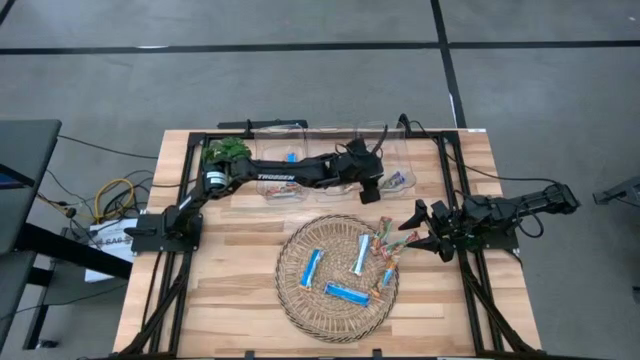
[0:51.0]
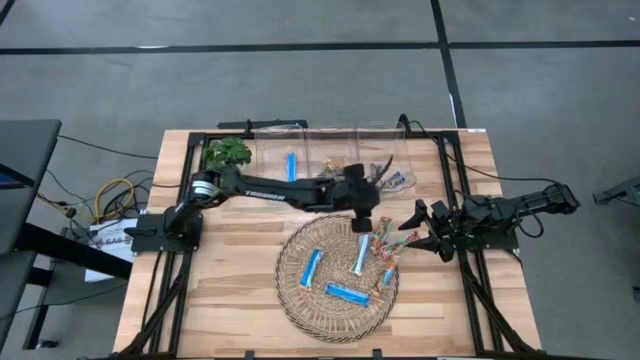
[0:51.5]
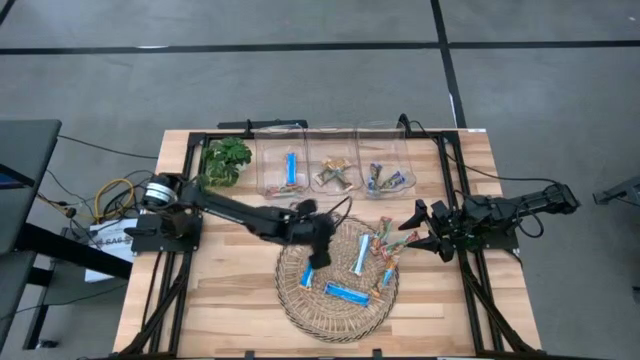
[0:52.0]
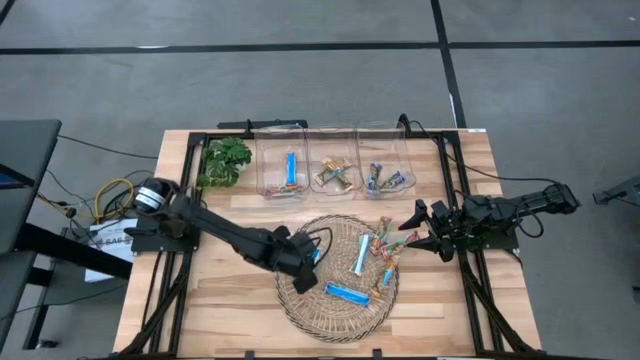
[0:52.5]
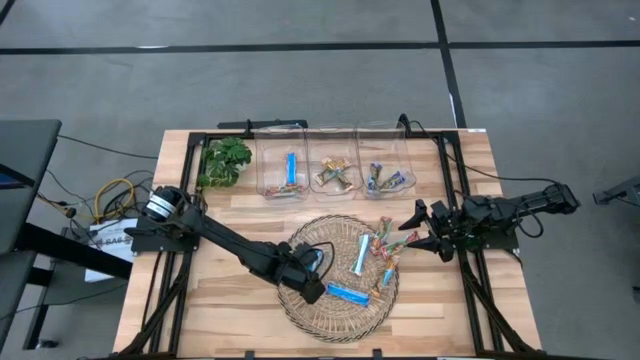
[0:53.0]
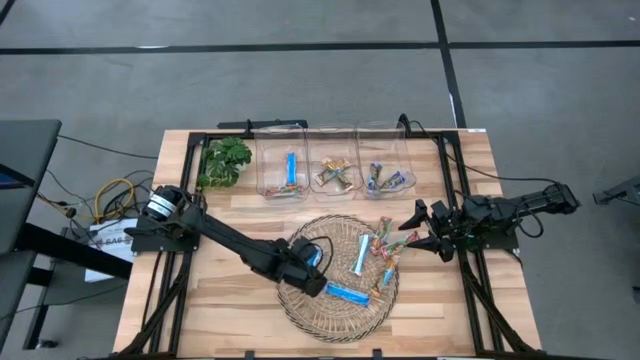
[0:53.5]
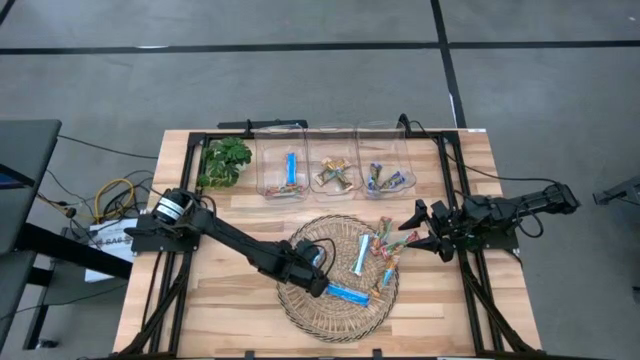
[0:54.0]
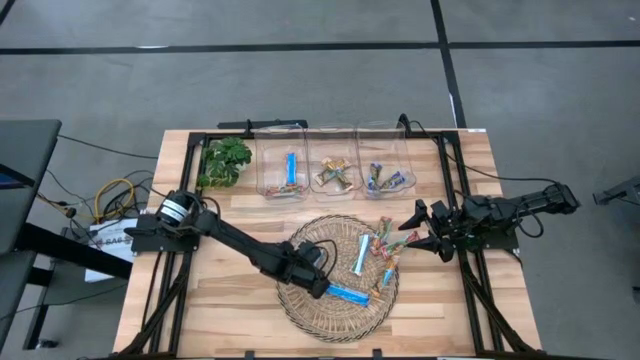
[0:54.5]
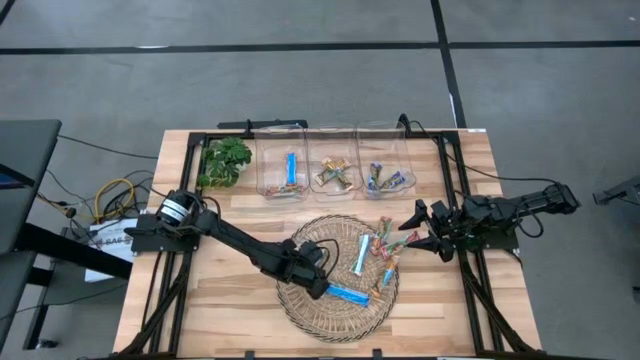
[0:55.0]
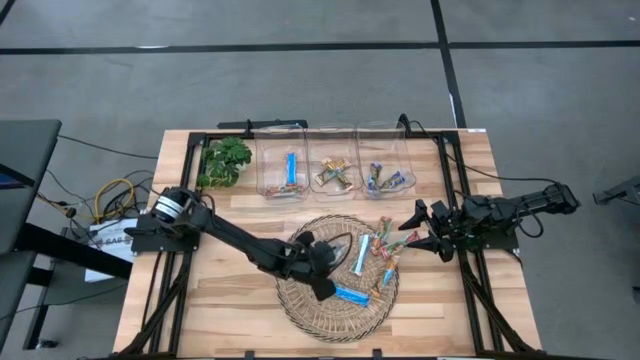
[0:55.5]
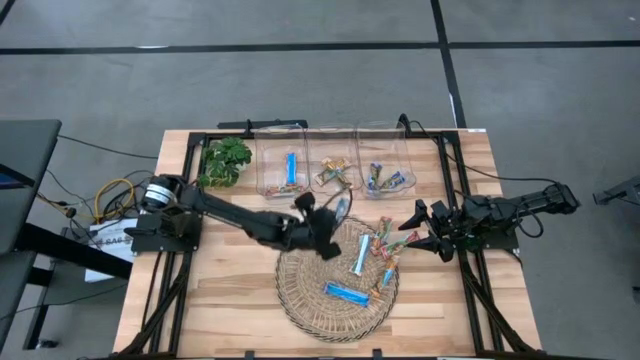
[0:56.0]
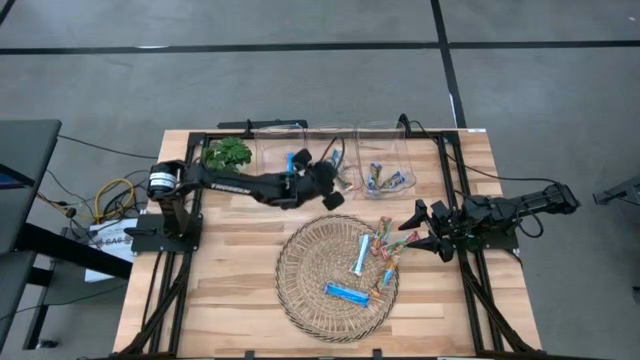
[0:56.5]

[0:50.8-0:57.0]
Task: Pick and place Granola Bars by type
Put the yellow granola bar into the middle transparent bin

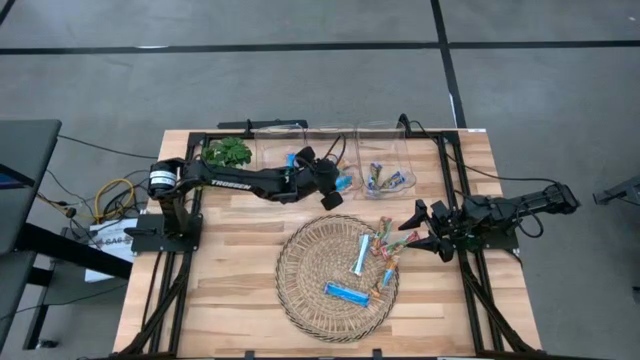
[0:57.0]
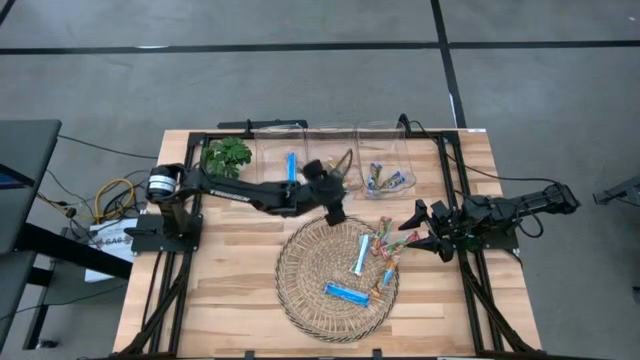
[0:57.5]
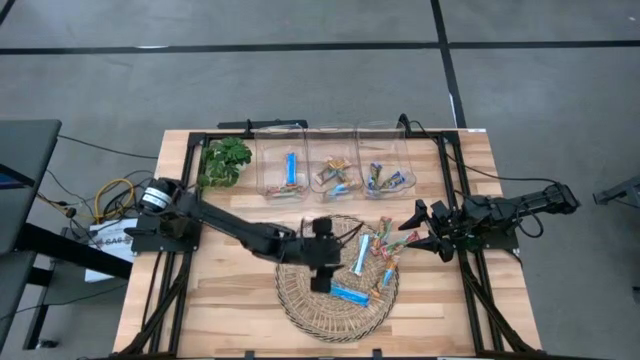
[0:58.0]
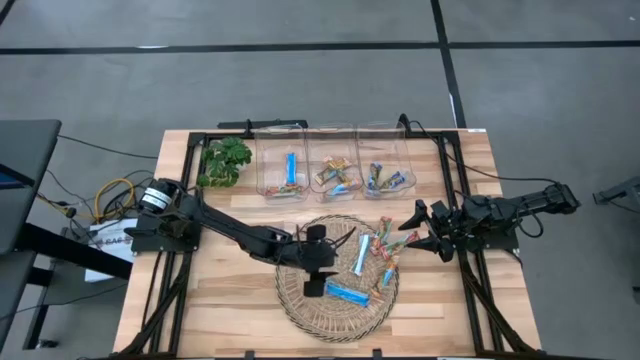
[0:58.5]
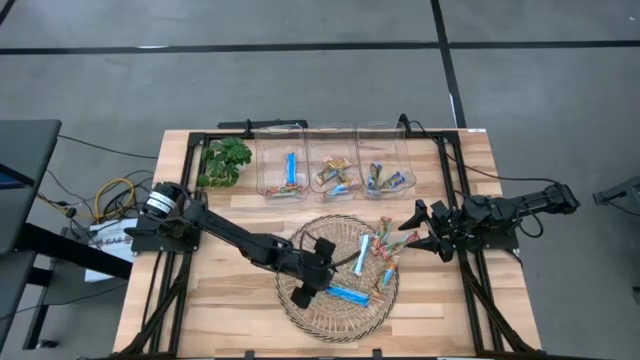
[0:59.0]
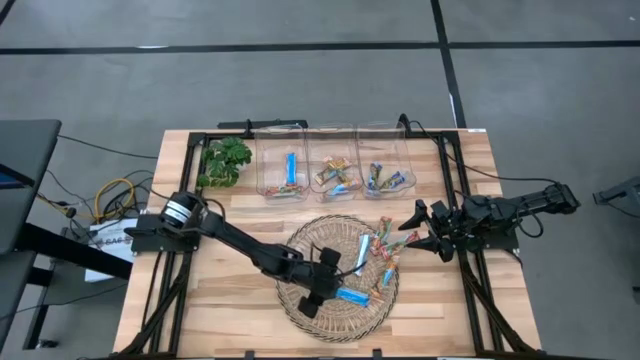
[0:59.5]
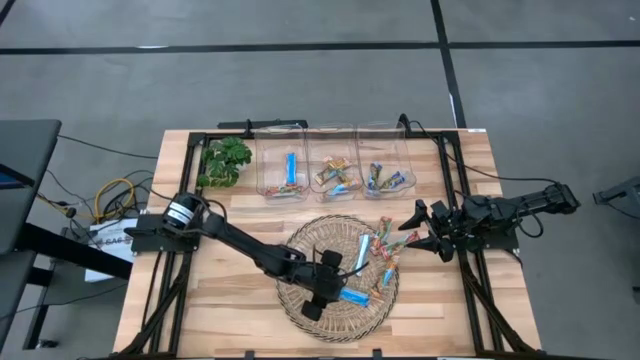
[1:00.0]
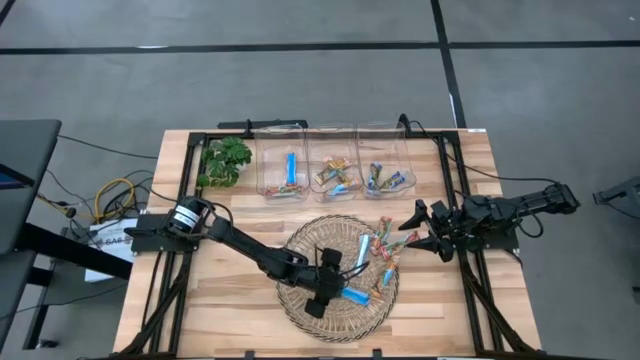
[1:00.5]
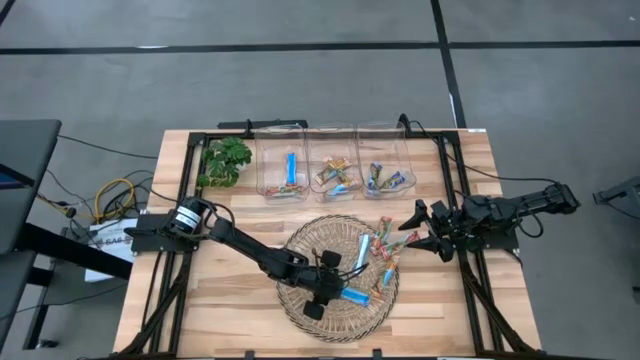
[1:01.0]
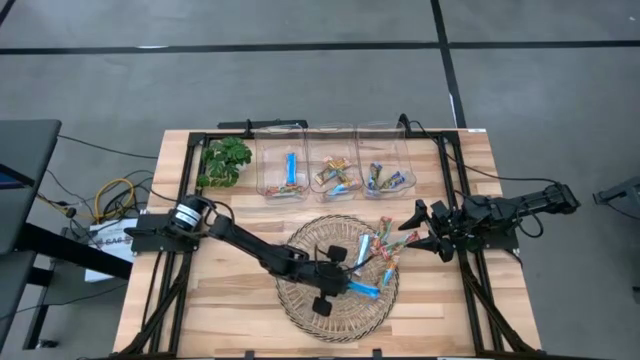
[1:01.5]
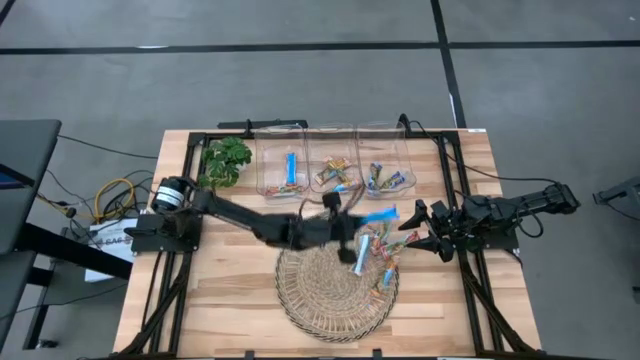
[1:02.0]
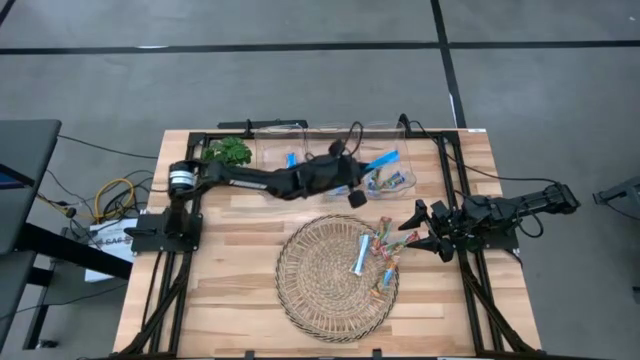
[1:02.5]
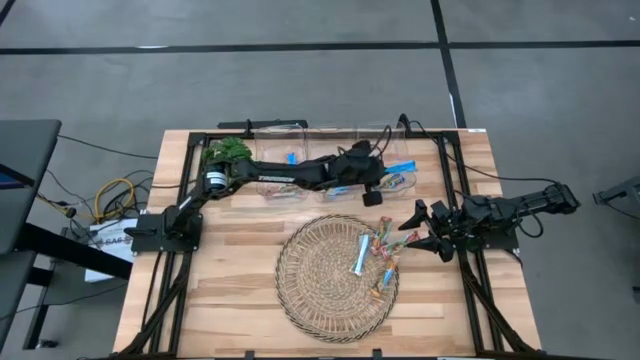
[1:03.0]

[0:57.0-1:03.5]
Put the blue granola bar into the right transparent bin

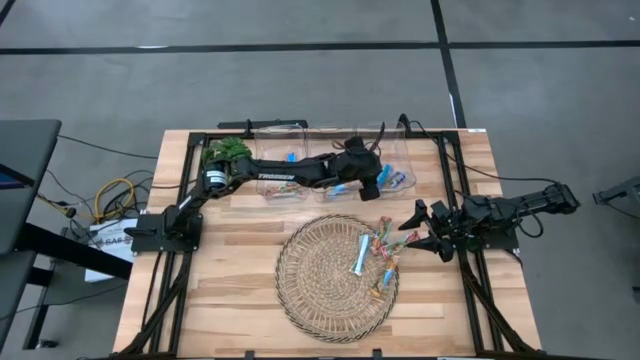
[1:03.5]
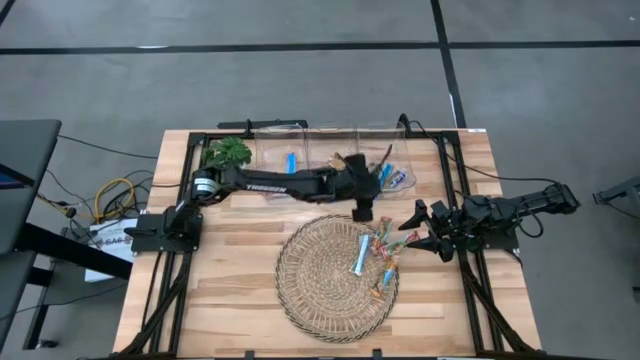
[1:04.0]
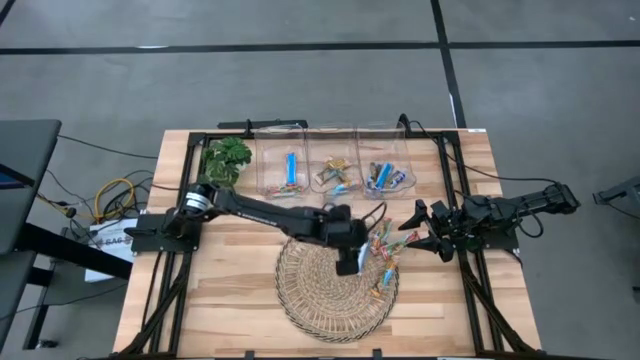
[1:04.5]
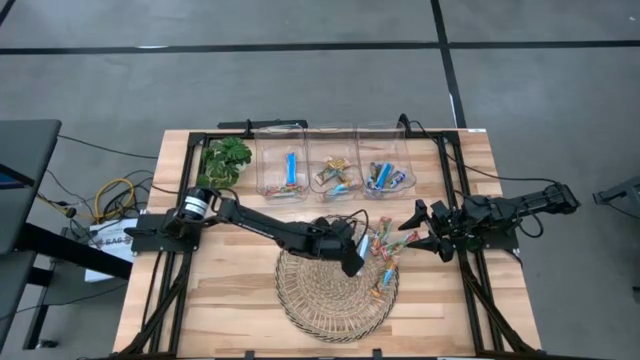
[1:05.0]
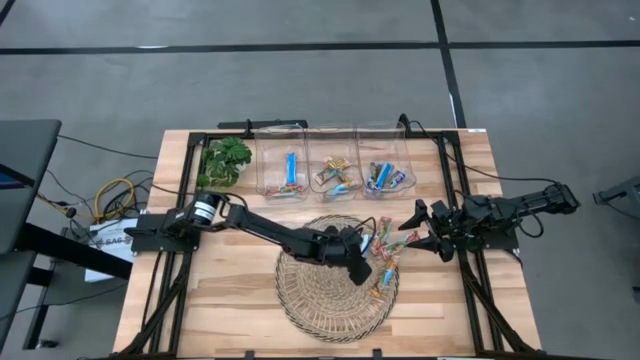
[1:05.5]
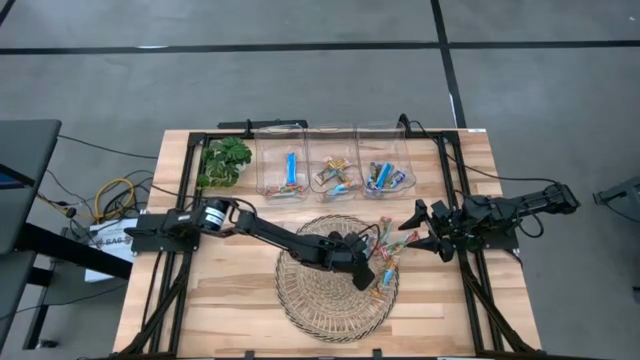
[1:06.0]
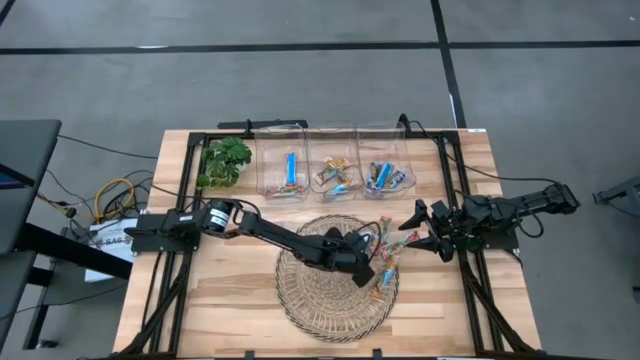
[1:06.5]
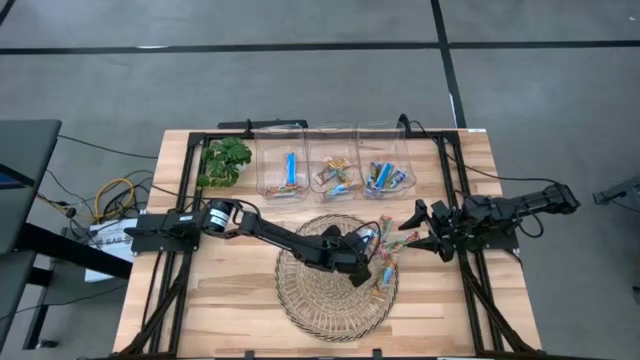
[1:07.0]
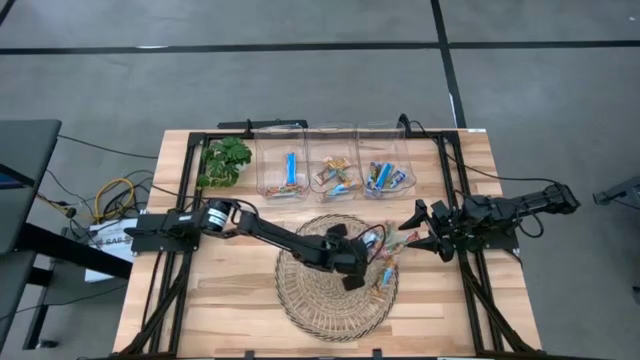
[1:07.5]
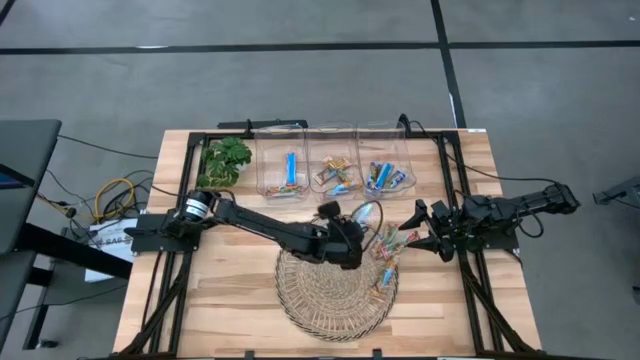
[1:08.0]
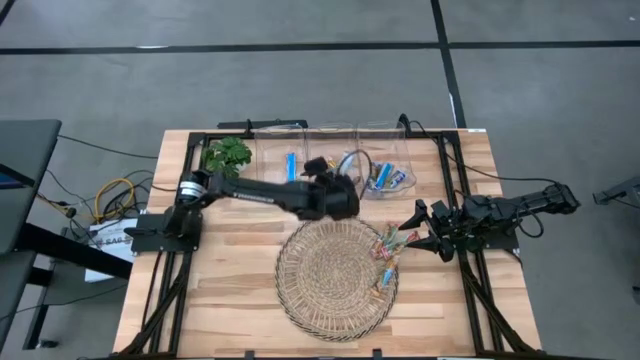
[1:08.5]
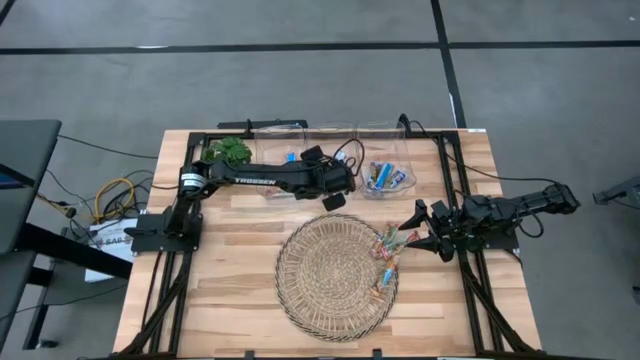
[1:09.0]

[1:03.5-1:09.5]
Put the yellow granola bar into the middle transparent bin

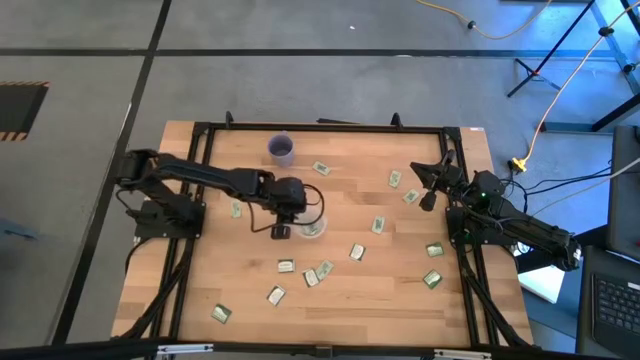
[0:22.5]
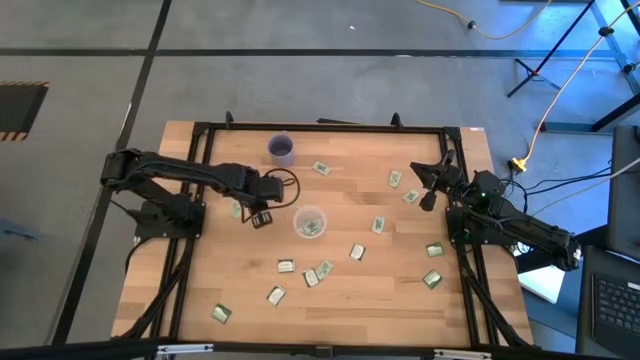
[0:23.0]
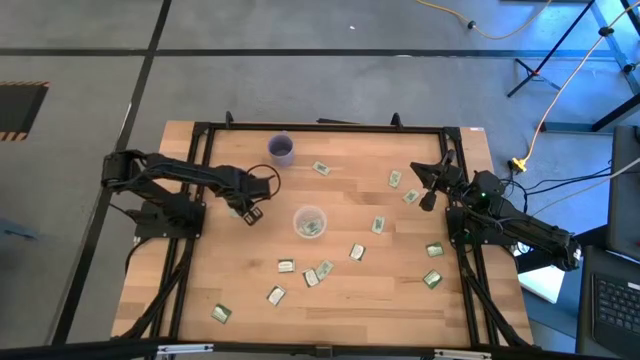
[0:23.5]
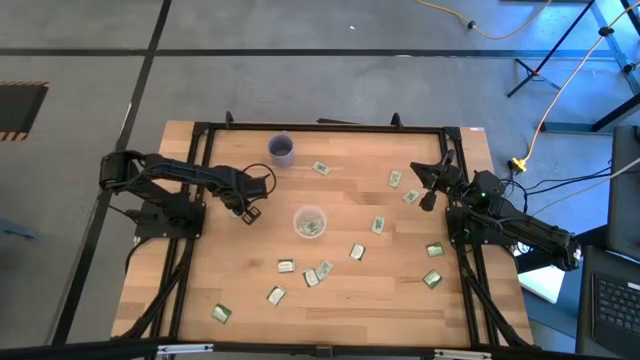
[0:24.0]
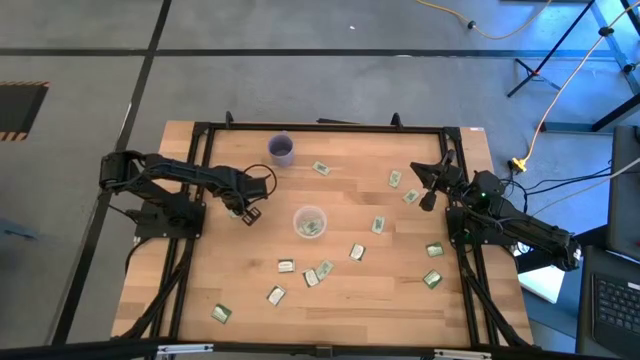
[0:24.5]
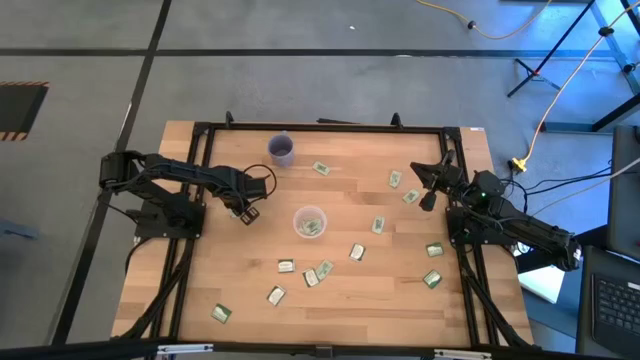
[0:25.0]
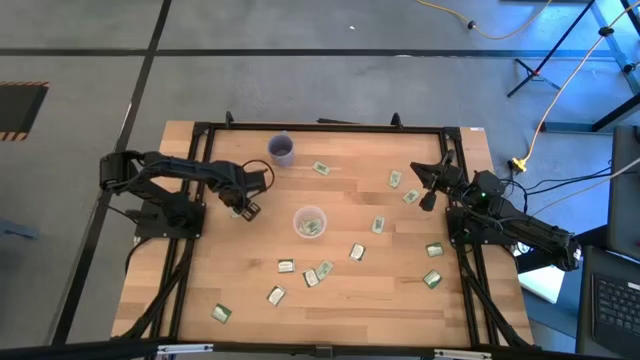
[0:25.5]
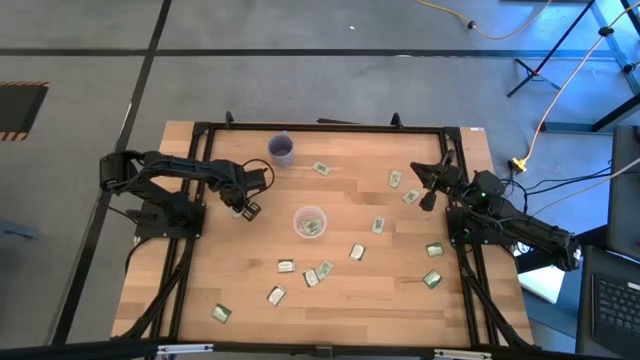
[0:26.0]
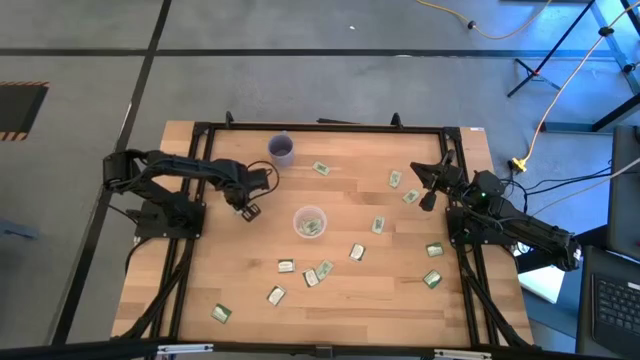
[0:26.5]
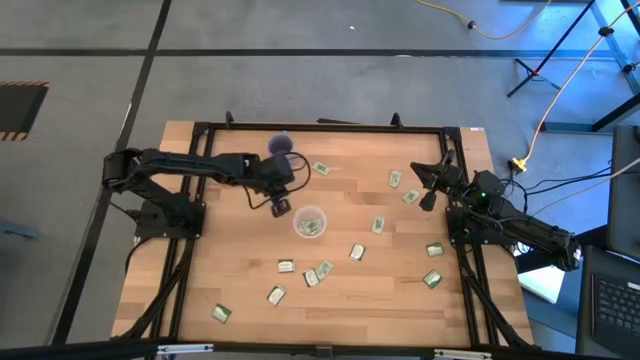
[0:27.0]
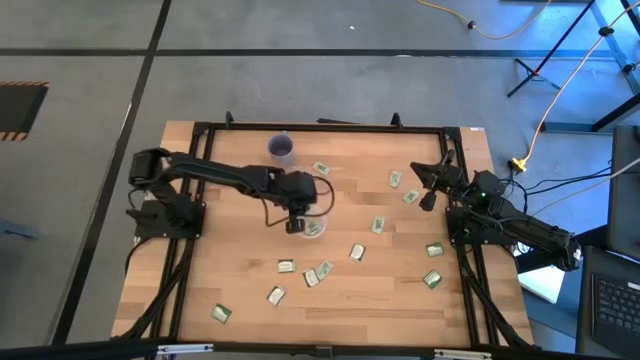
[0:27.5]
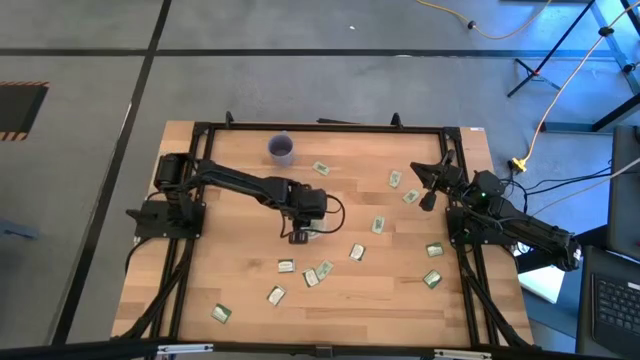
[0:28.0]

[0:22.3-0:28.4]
Task: Pick and place Stevia / Truvia into bins
Put the stevia packet into the transparent container
